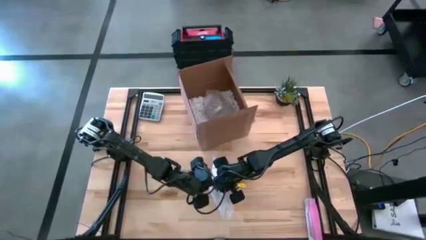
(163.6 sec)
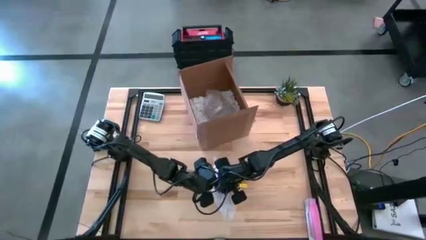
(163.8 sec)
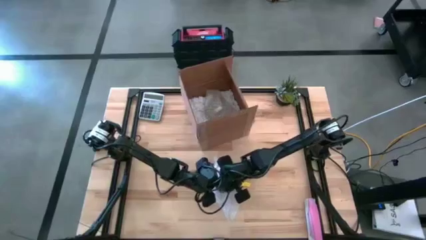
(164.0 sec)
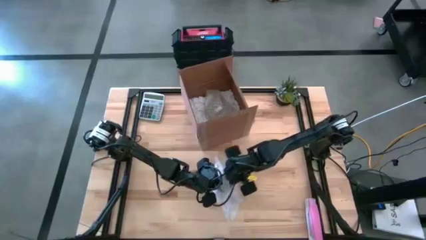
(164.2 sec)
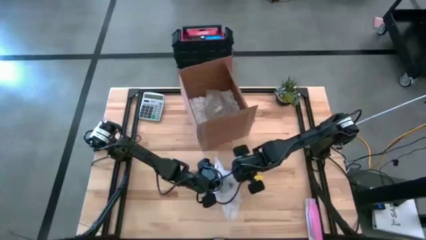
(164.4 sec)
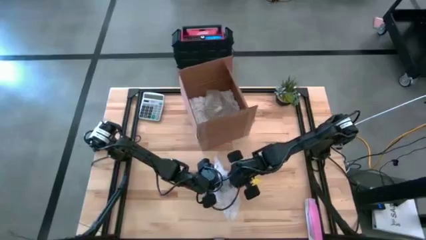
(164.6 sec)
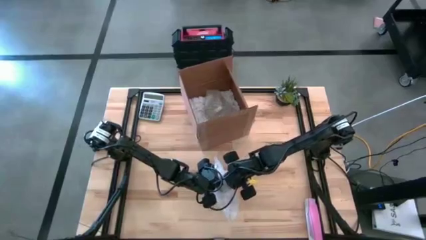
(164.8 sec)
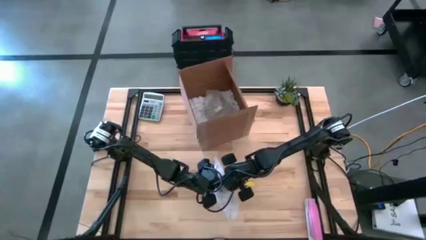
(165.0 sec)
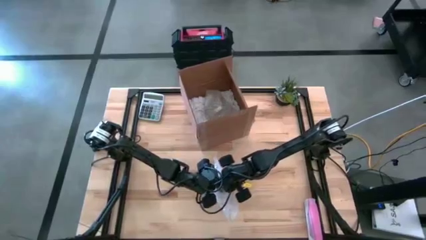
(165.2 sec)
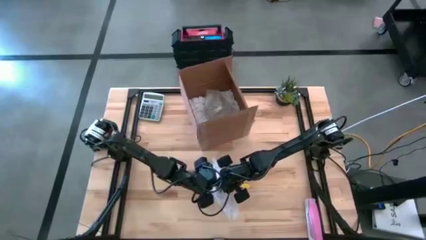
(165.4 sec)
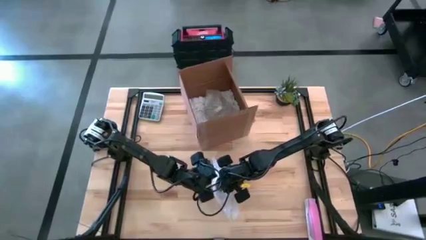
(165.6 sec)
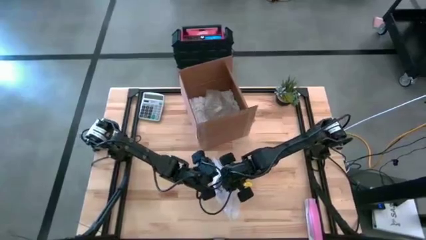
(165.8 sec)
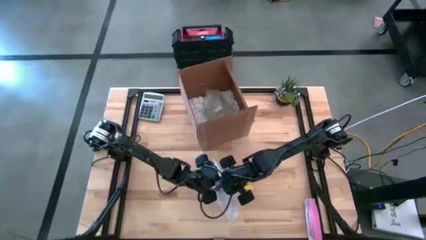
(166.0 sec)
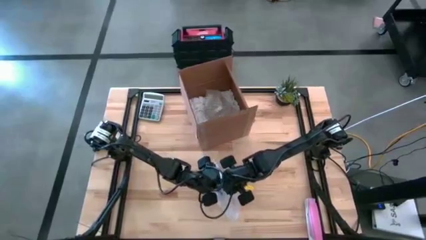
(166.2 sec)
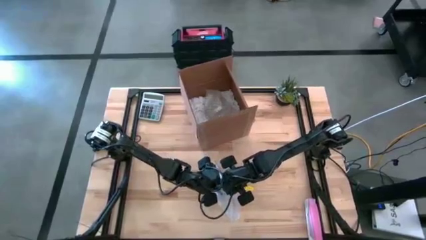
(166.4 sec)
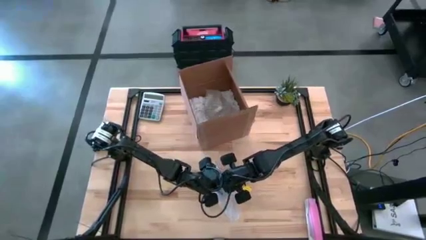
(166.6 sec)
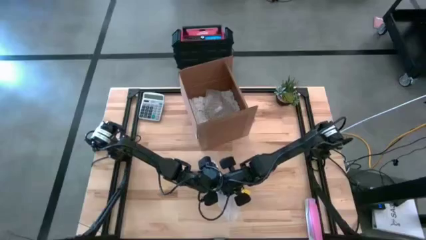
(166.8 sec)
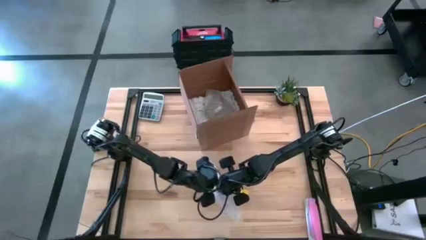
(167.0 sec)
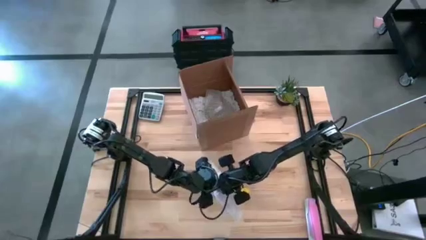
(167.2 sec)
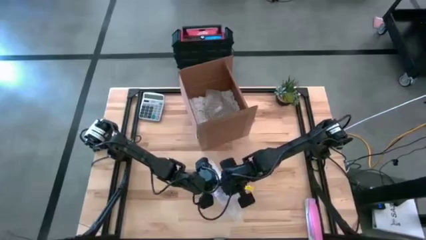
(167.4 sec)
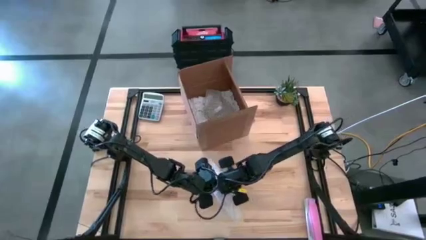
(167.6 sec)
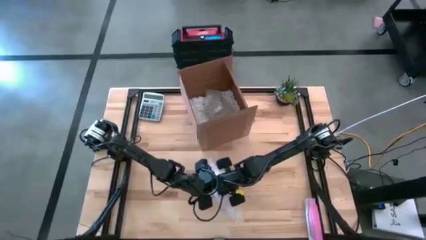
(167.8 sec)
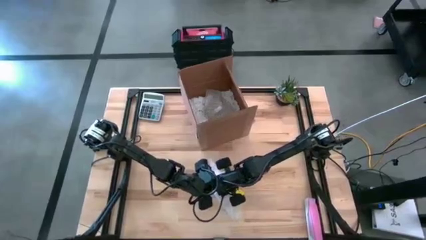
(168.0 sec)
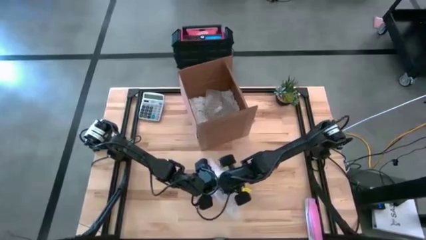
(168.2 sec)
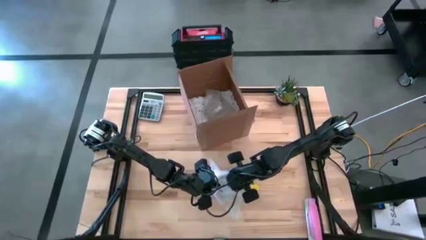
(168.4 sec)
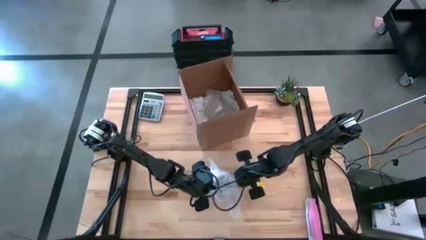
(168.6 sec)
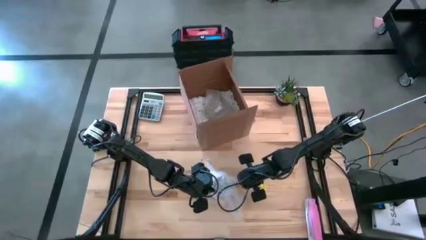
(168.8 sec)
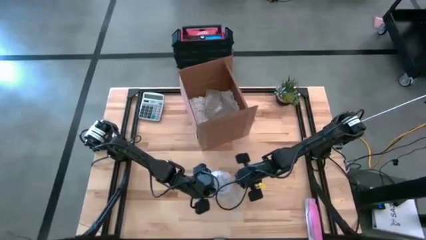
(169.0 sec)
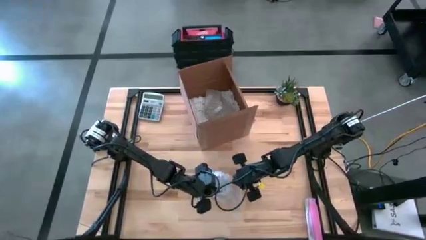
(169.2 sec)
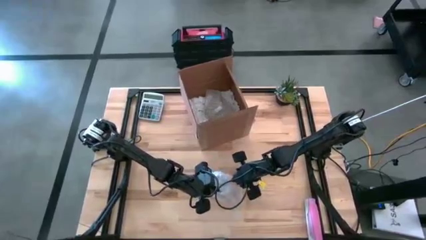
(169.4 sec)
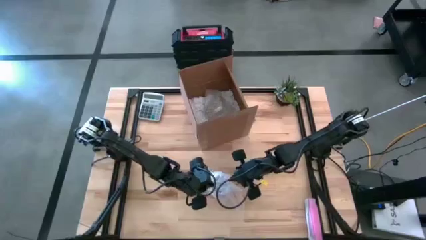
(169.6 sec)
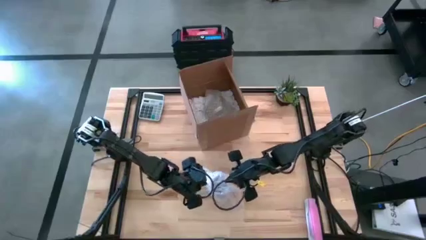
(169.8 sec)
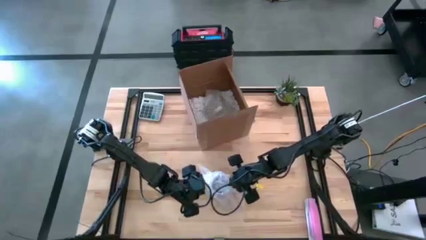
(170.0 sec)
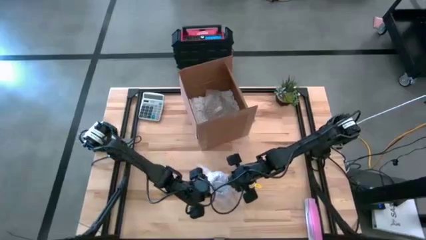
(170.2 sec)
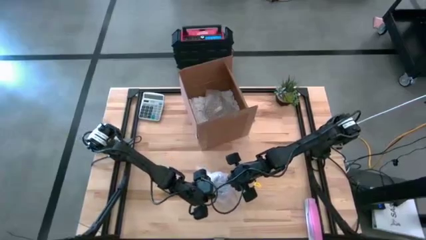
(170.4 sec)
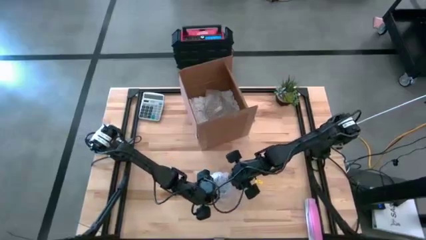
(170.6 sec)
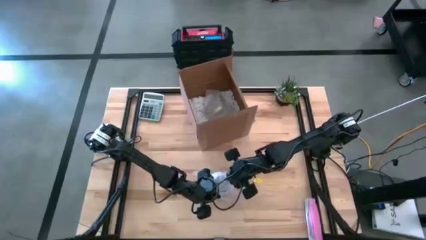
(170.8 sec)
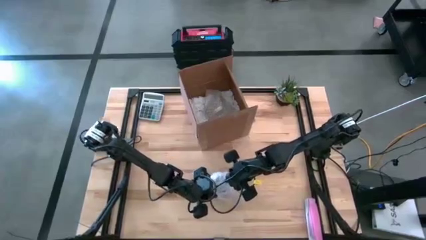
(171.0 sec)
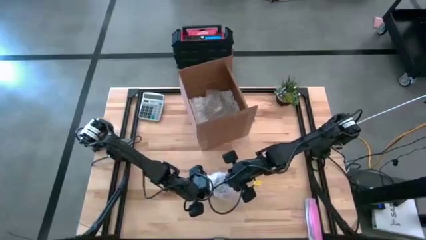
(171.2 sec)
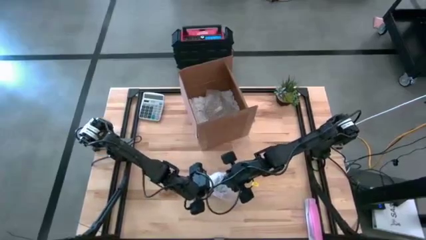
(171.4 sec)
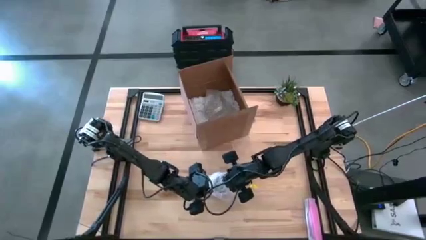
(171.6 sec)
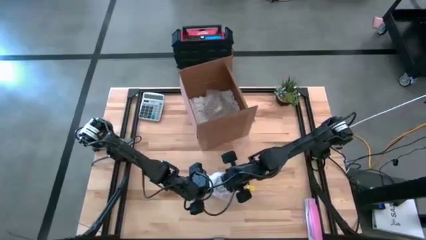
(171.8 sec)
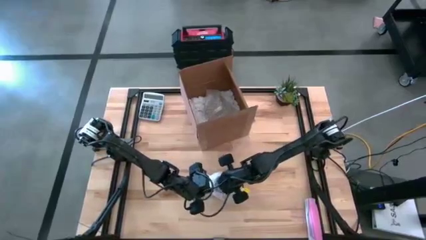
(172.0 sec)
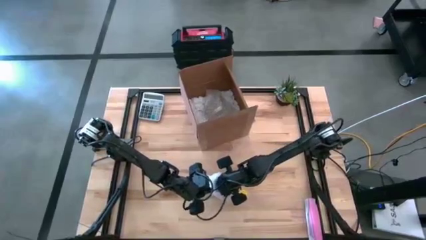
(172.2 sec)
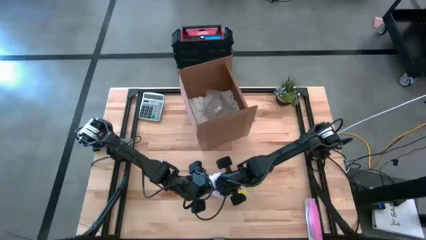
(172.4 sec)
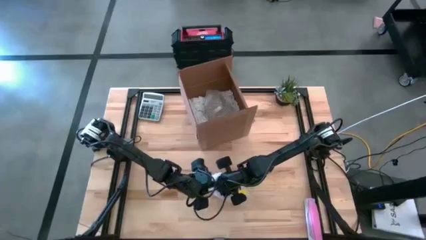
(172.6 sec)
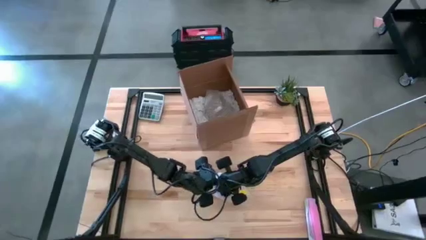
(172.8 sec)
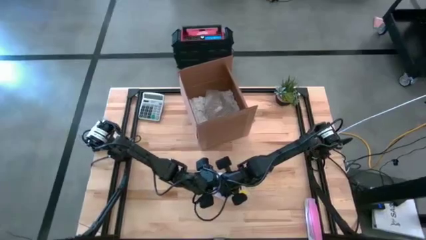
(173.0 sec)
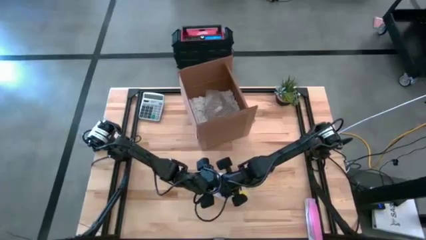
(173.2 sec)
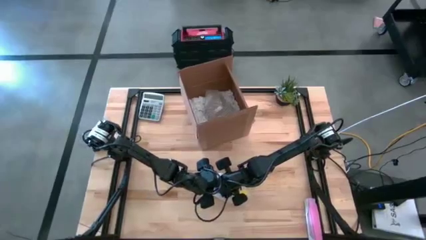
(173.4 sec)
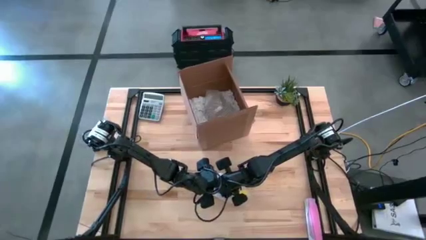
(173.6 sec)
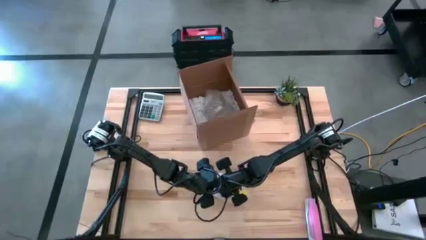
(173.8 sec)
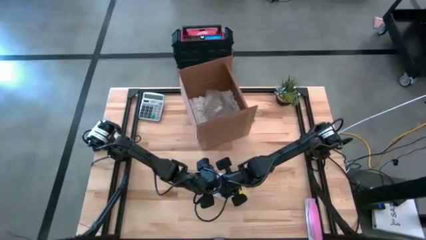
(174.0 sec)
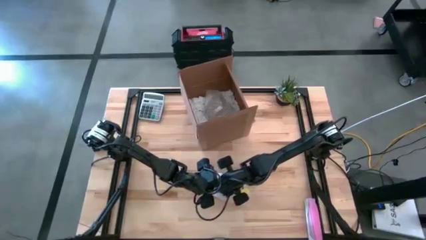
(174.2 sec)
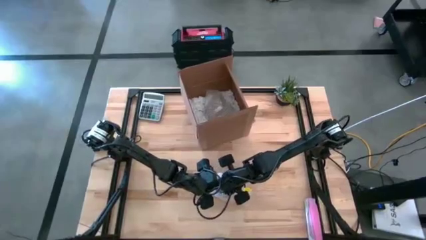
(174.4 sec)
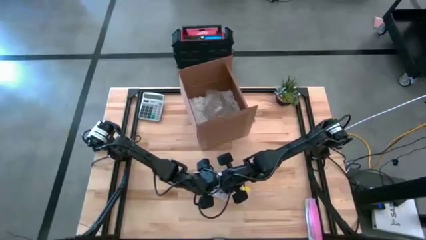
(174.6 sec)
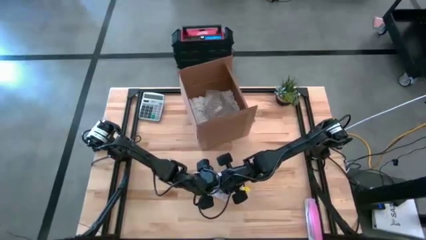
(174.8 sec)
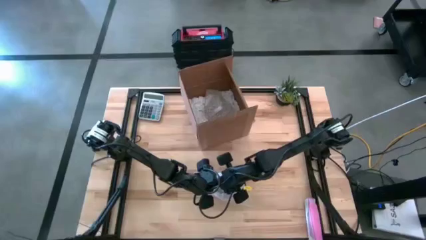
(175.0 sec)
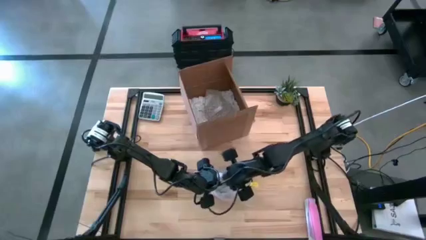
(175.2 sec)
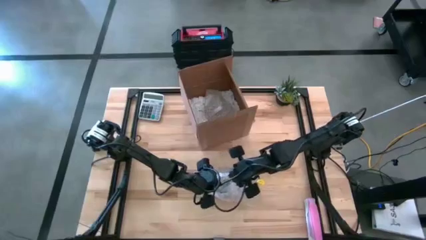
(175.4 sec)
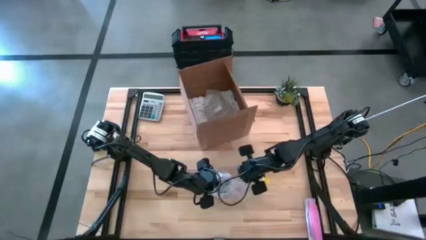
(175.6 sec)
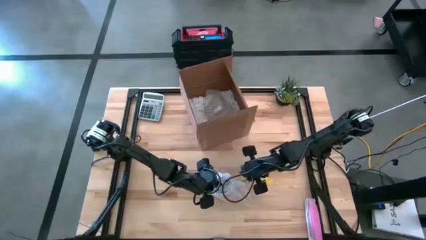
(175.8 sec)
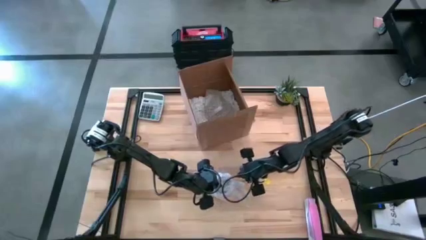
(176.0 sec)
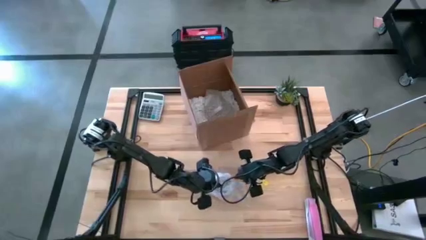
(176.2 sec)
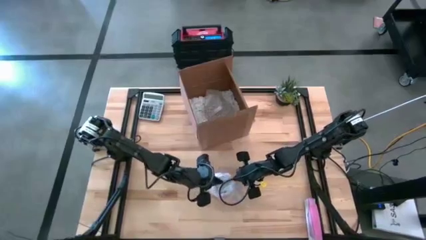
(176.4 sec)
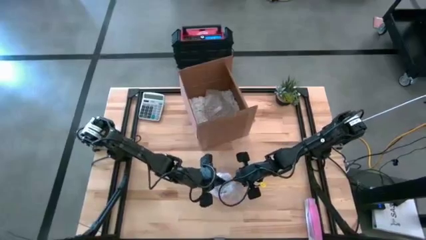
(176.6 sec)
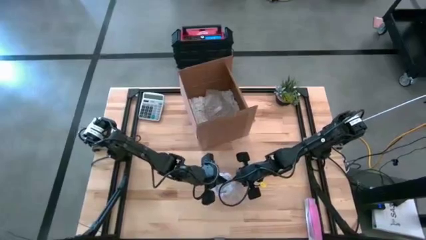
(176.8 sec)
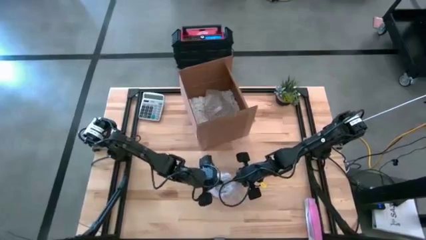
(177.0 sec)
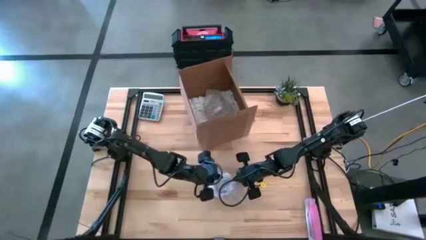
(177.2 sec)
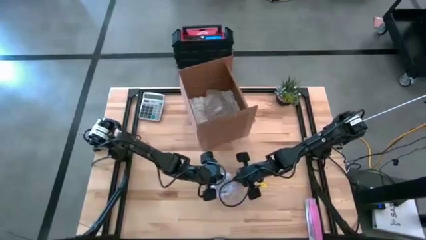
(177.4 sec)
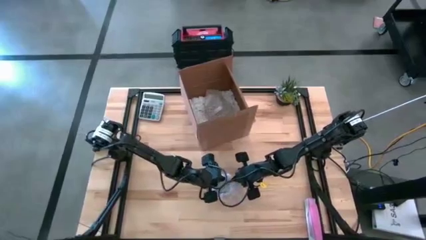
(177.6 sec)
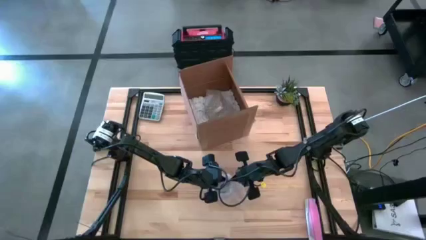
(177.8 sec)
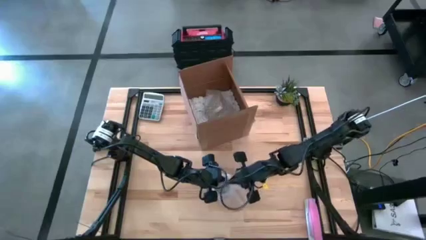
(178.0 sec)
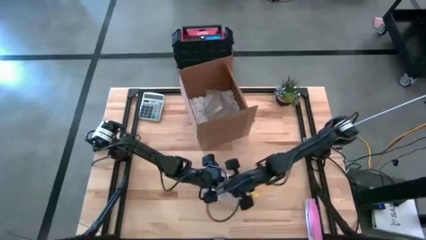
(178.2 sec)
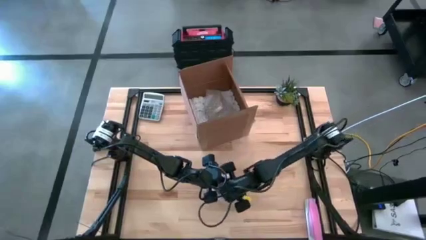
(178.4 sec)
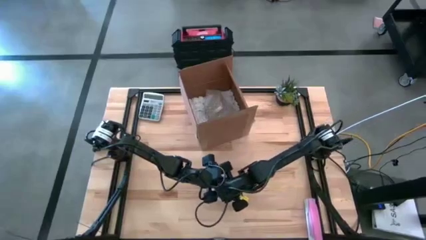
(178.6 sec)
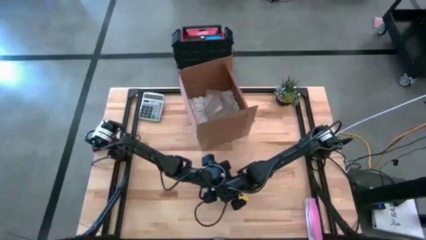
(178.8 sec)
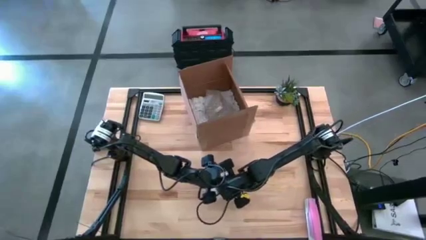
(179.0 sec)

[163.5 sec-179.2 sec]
Task: wrap mug
Wrap the purple mug with the bubble wrap
